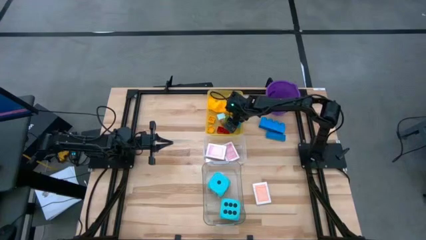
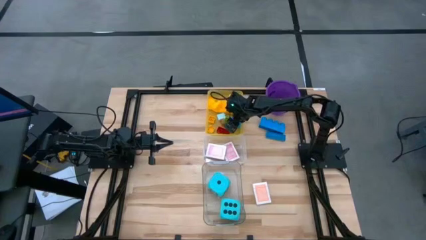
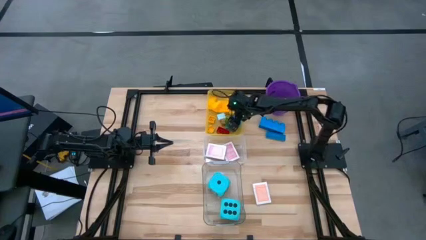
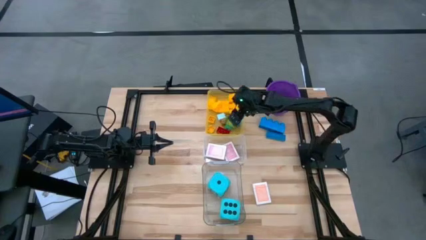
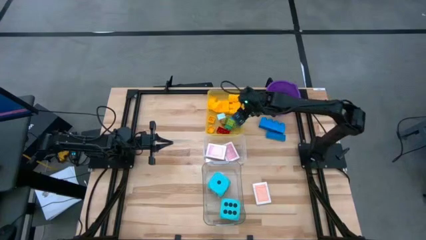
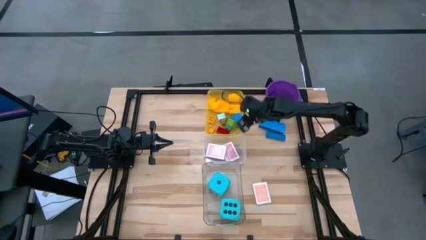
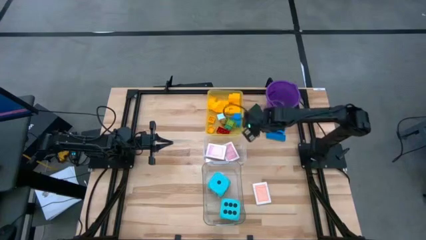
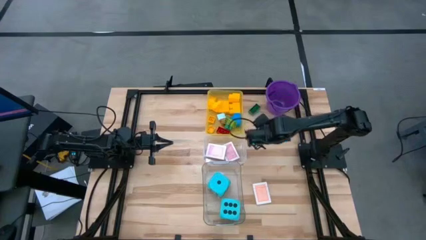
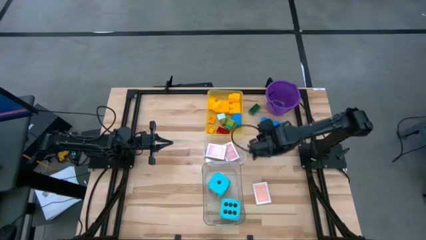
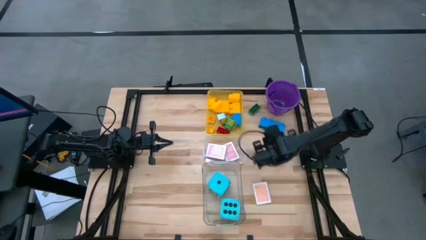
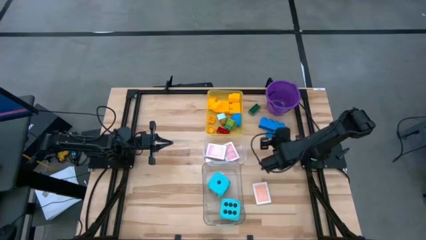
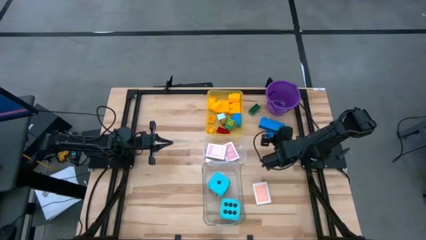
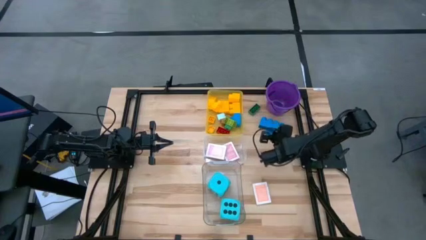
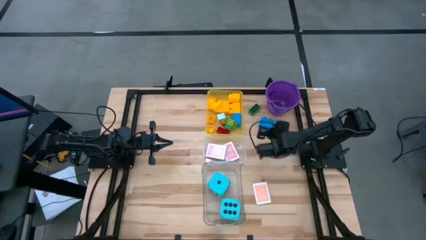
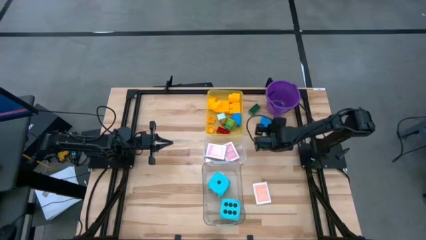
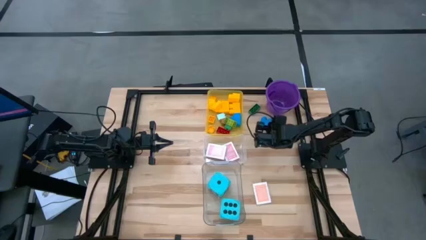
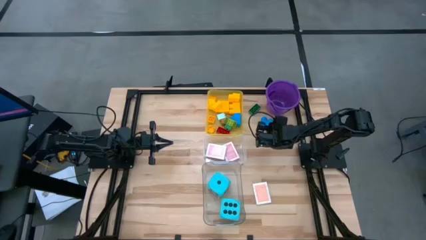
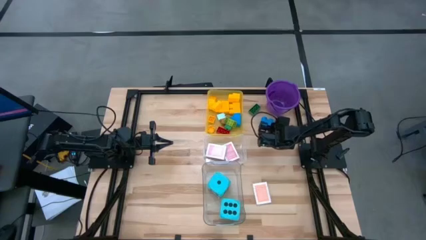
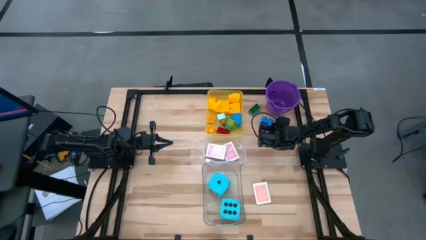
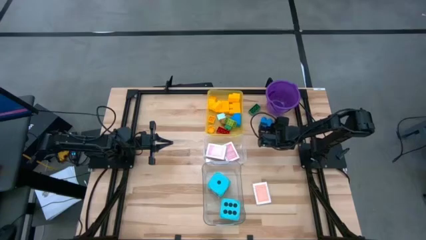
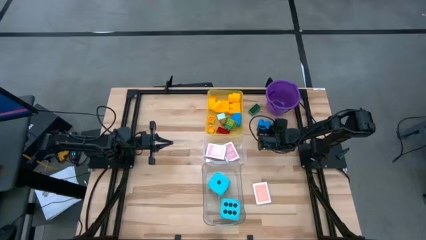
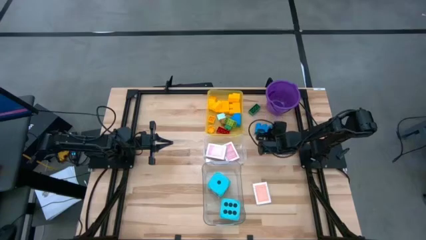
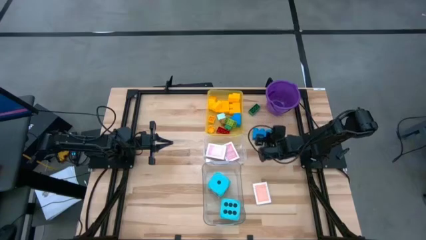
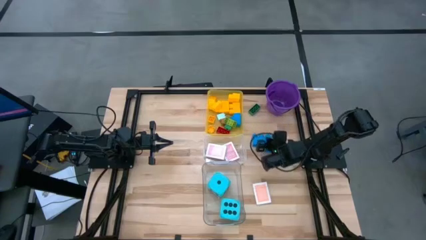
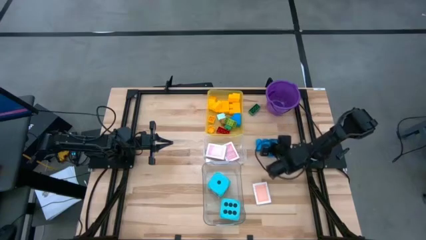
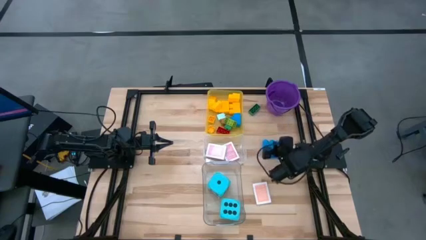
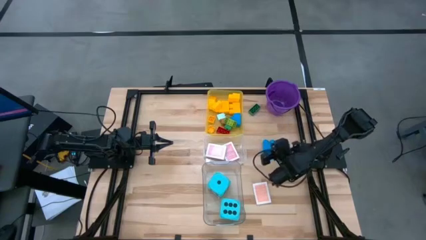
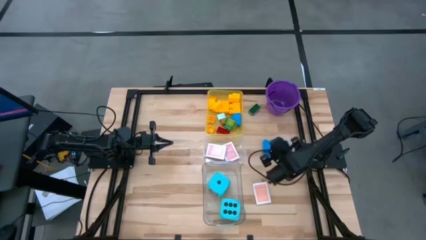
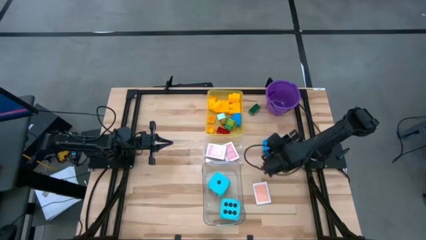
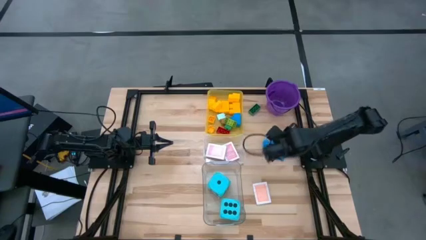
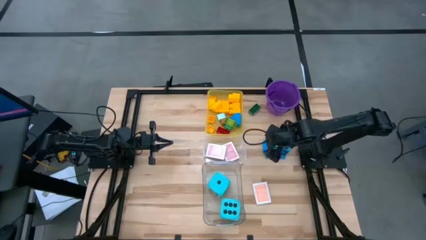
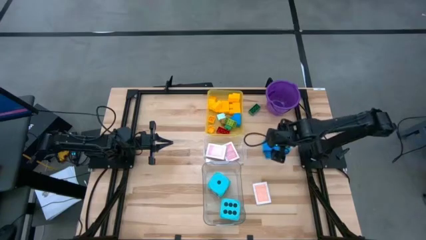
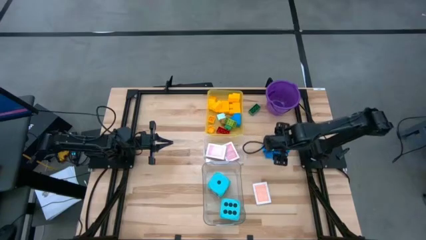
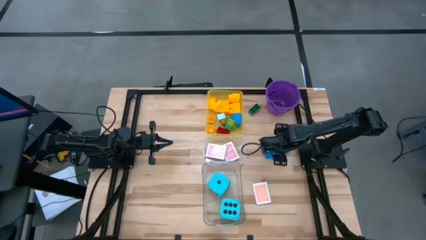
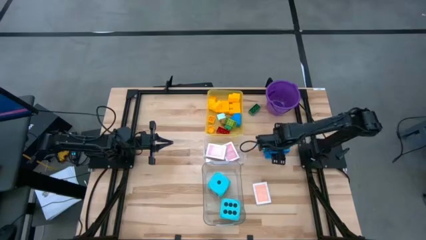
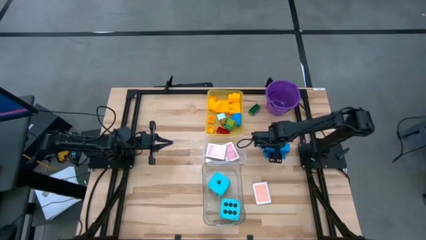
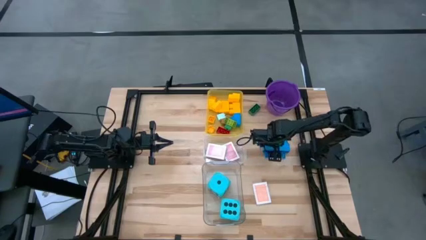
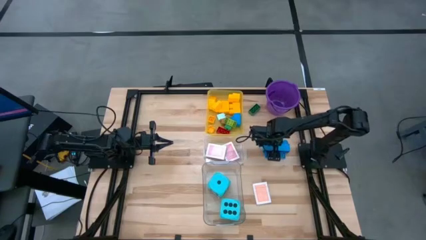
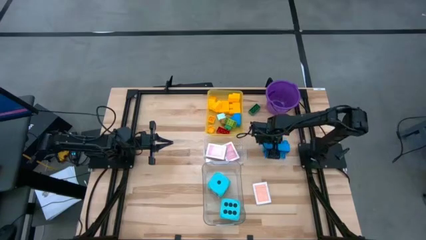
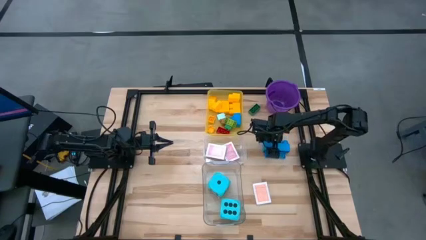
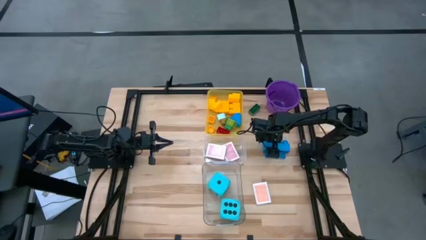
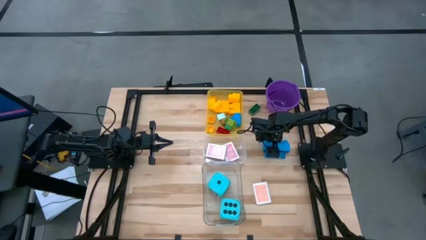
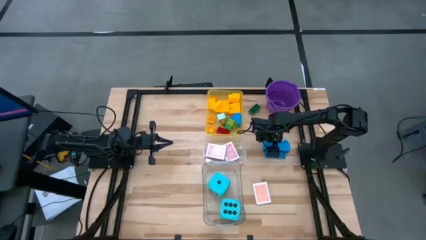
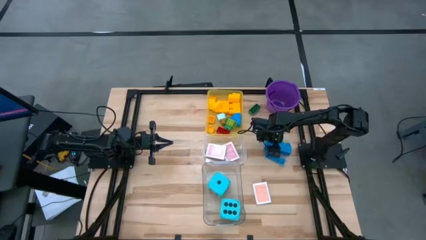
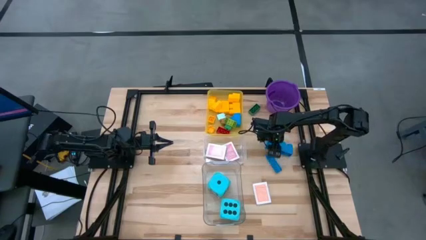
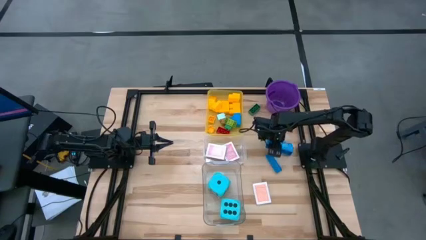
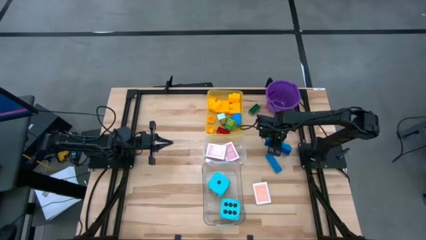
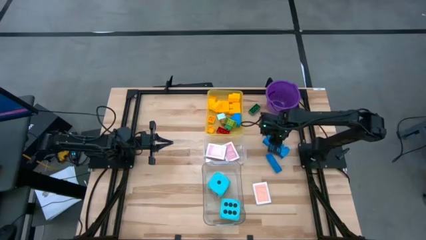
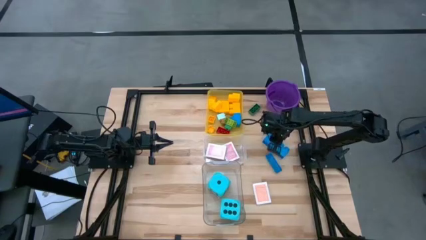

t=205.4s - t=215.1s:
Task: Pick & Place Toys
Put the blue game piece into the yellow bin

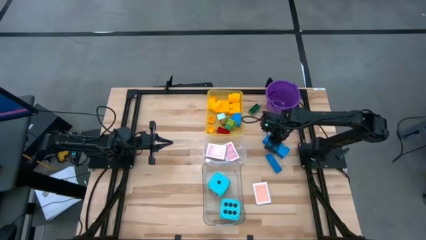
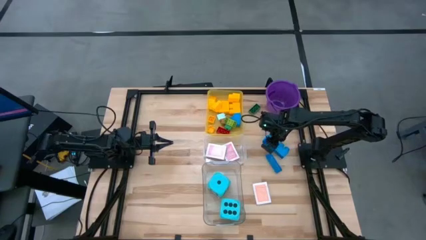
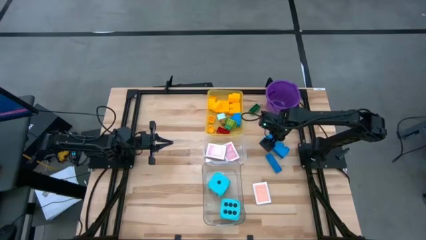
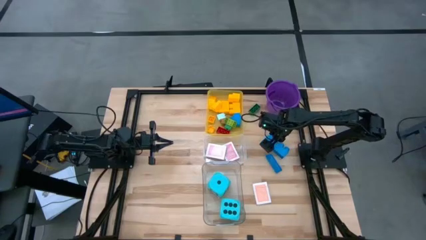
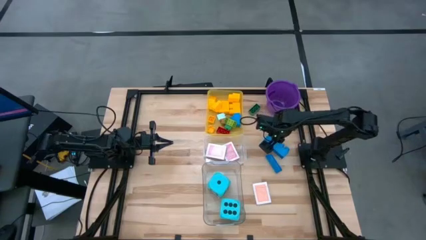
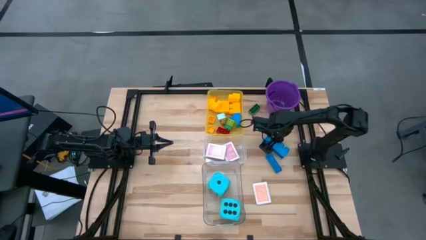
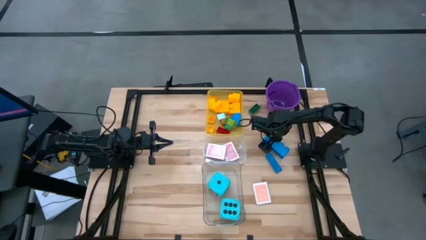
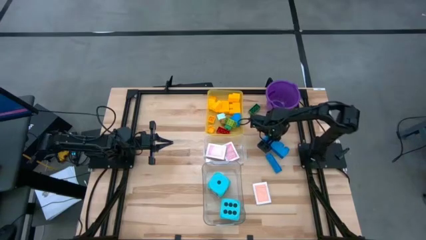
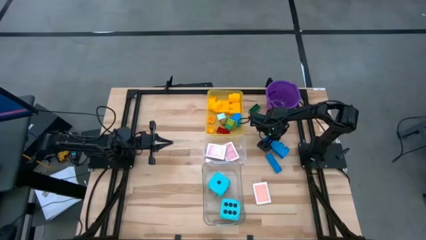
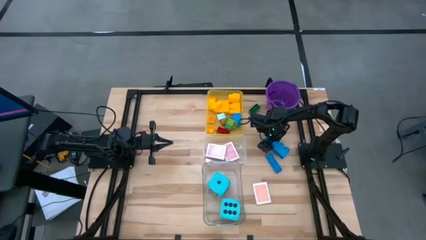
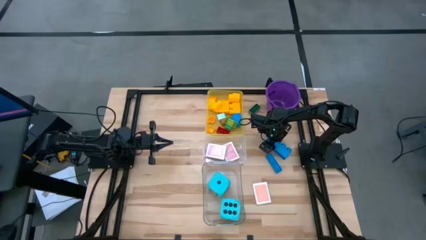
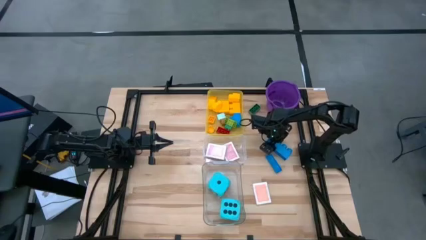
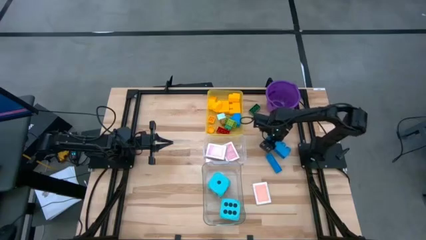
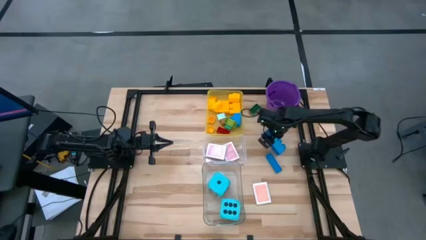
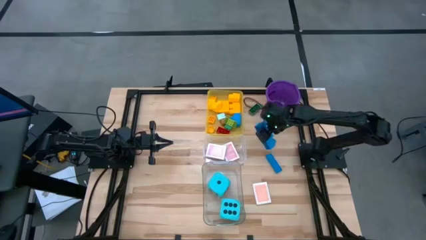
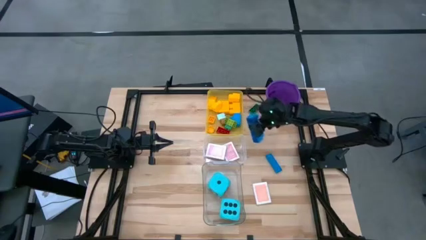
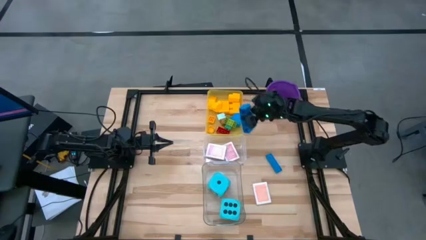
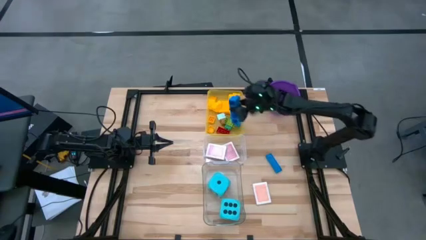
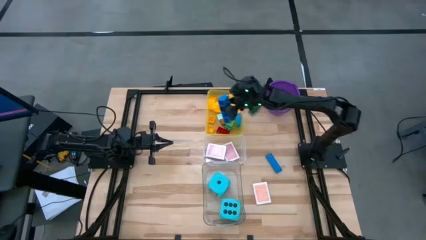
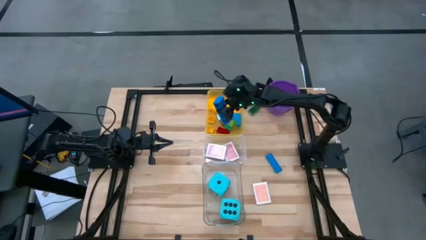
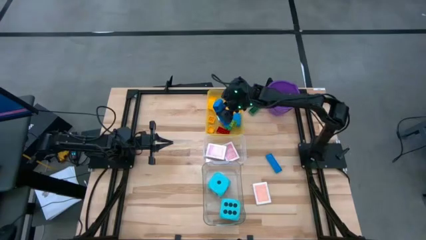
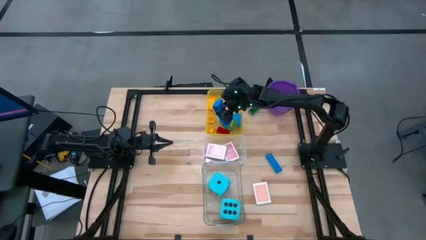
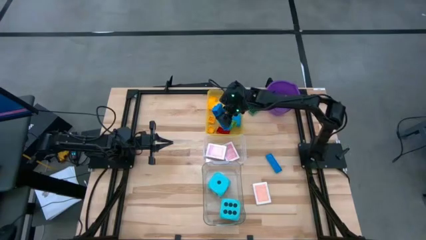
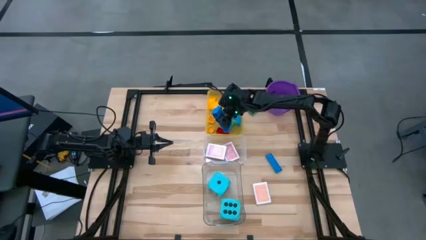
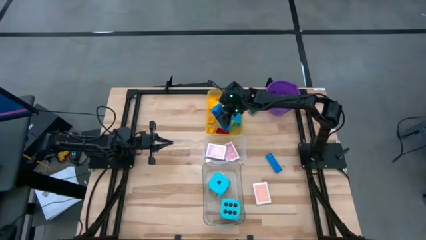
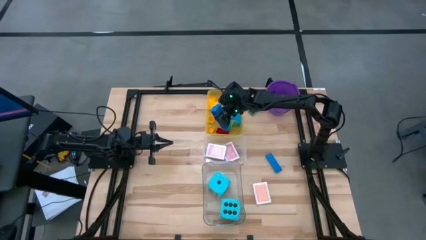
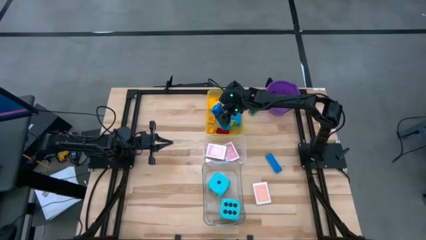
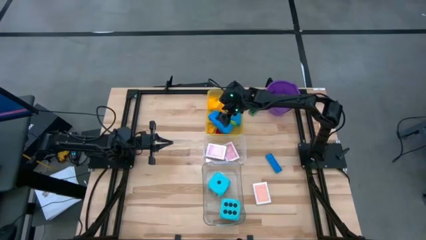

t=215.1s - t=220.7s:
Put the blue game piece into the yellow bin

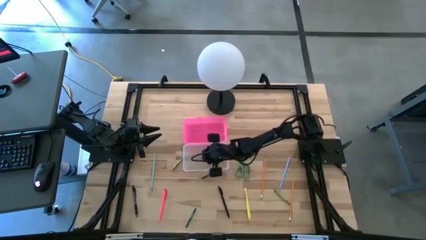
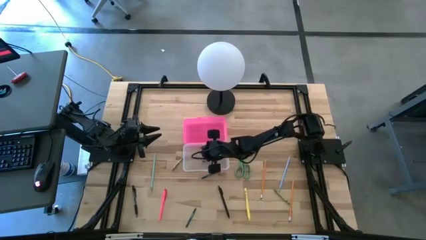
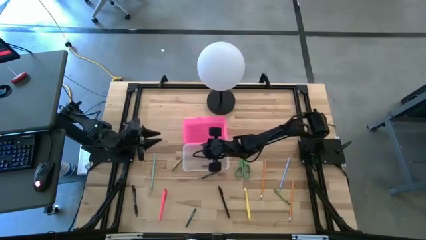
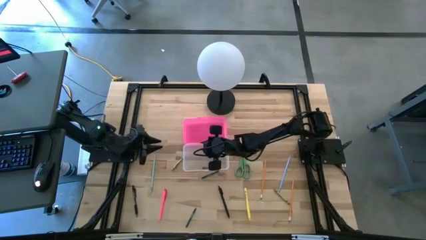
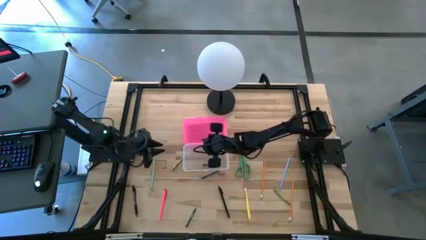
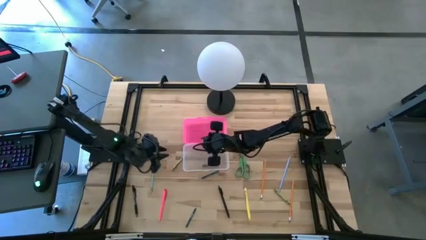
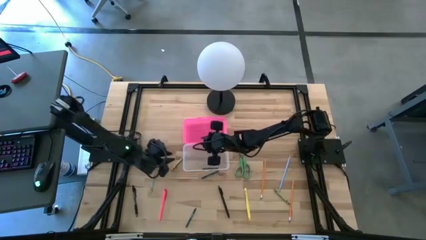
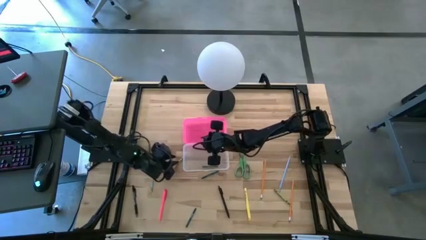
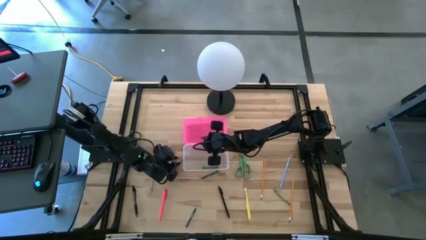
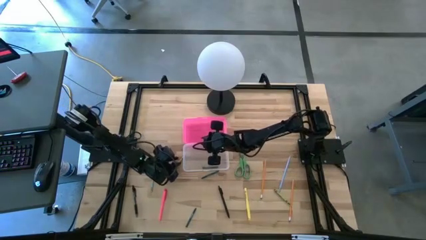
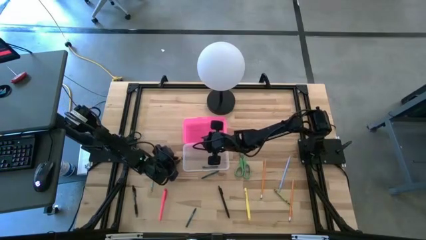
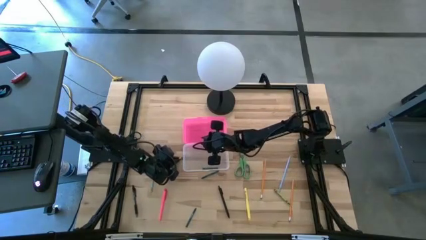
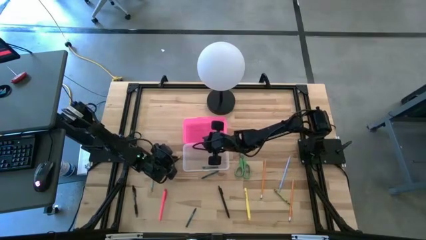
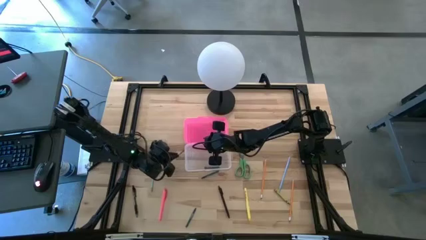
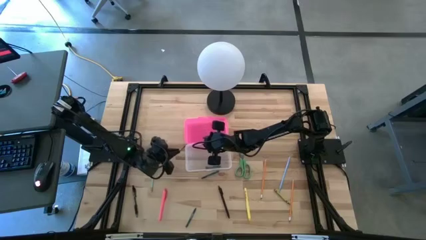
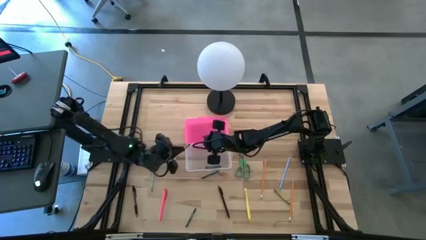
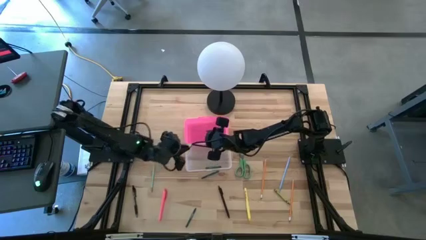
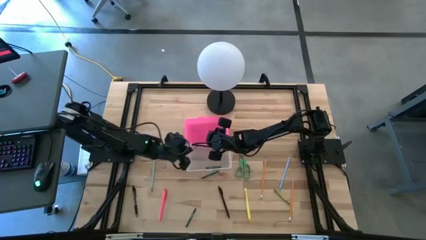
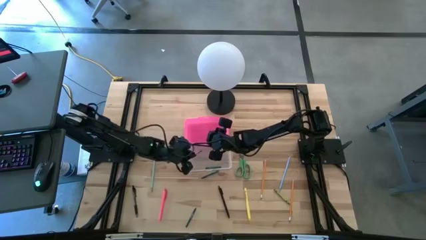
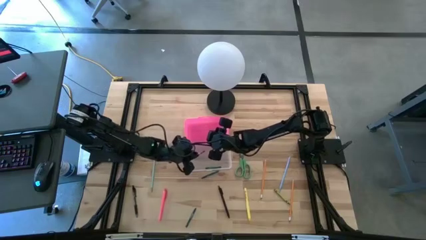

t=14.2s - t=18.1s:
Task: Pick & place school supplies into a supply box
Put the left light green crayon into the pink supply box
